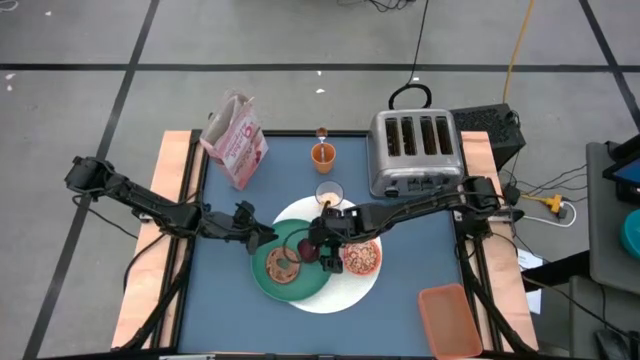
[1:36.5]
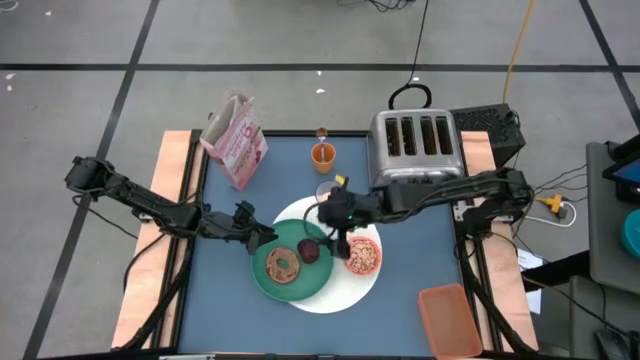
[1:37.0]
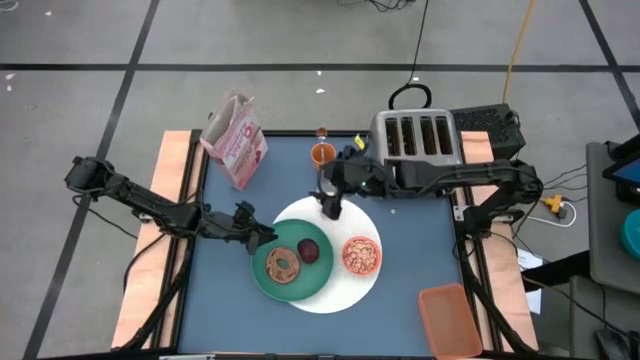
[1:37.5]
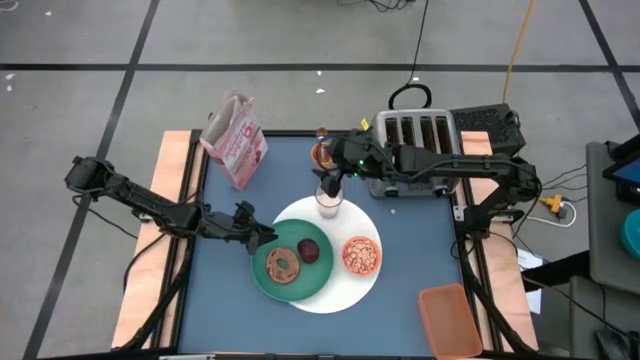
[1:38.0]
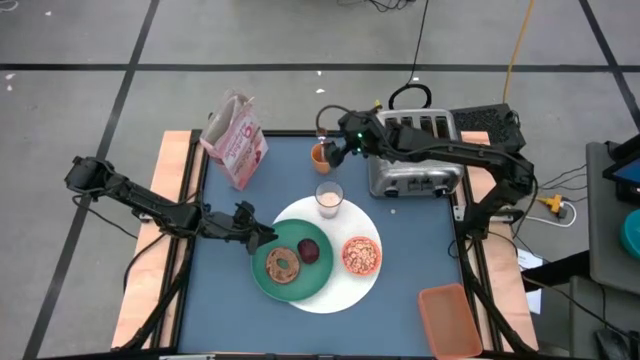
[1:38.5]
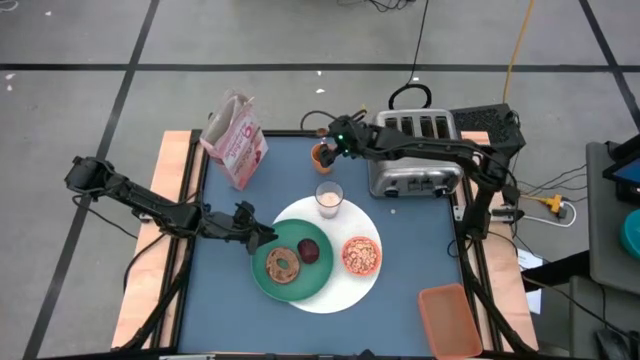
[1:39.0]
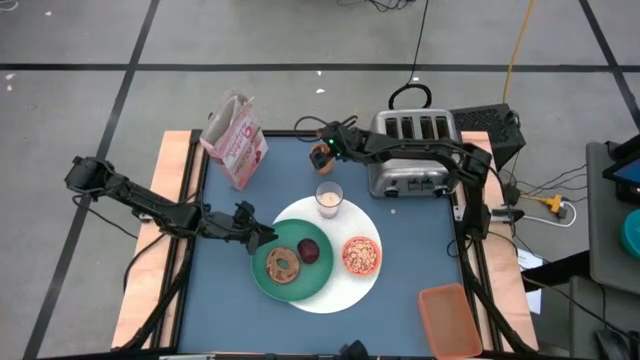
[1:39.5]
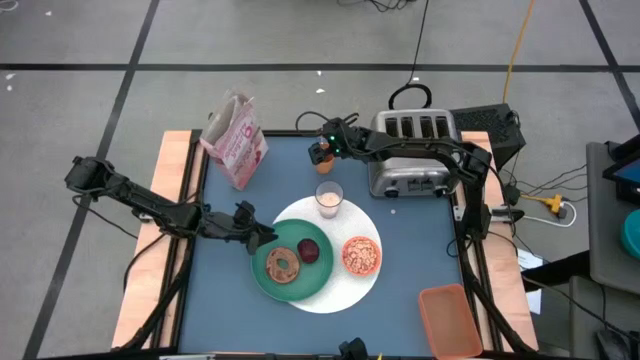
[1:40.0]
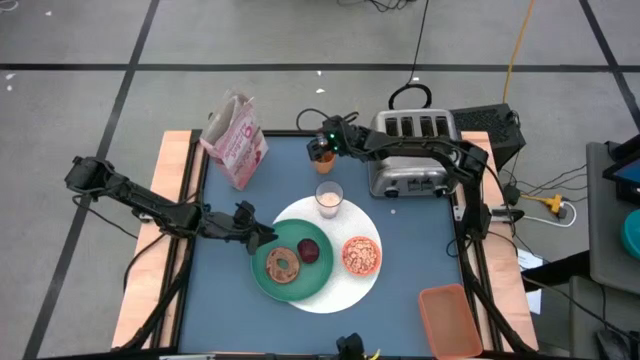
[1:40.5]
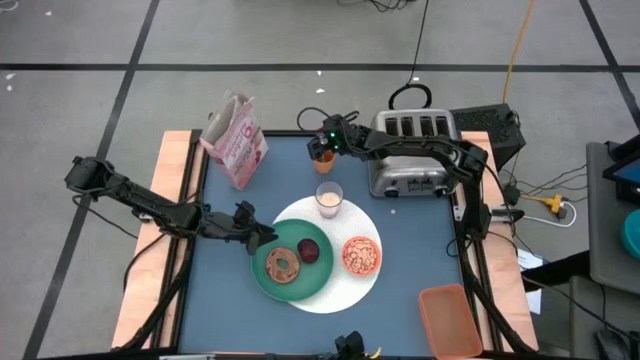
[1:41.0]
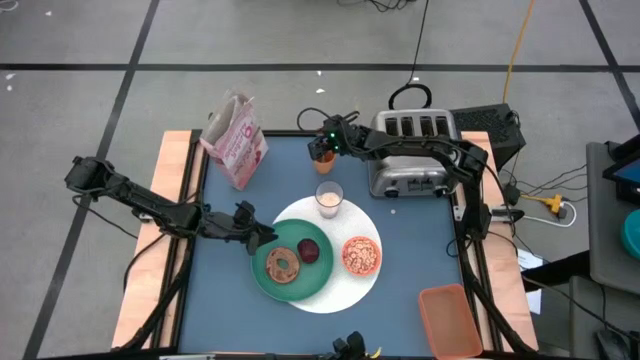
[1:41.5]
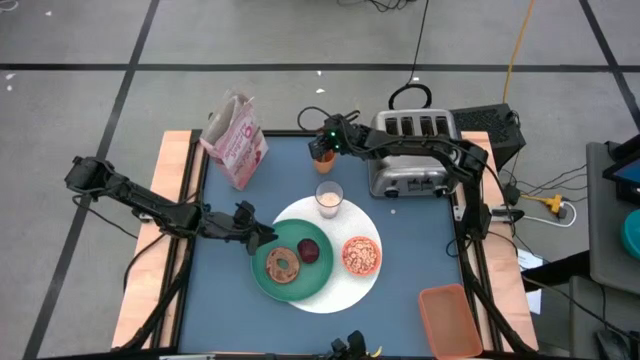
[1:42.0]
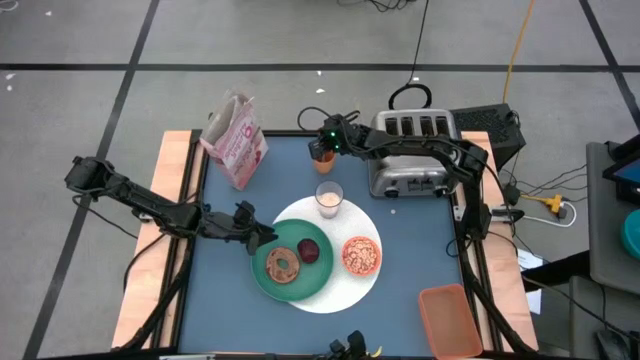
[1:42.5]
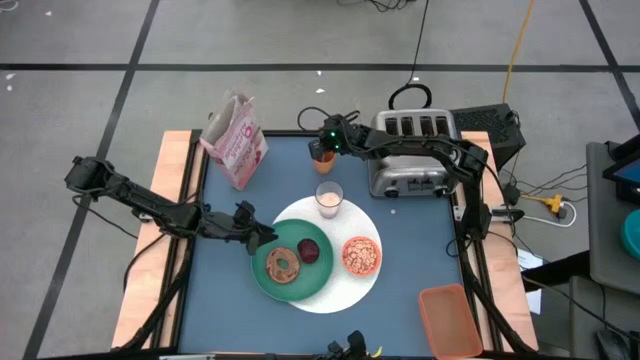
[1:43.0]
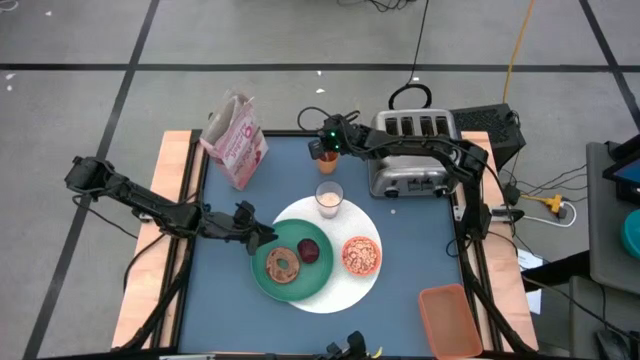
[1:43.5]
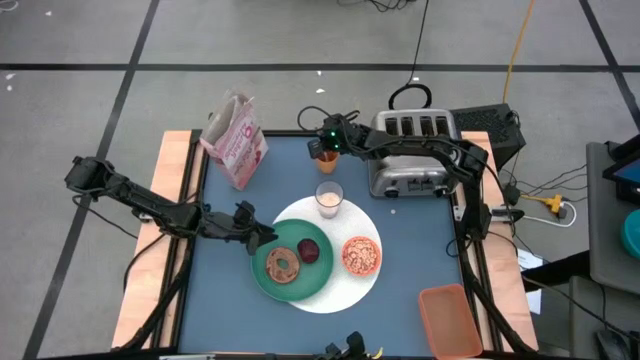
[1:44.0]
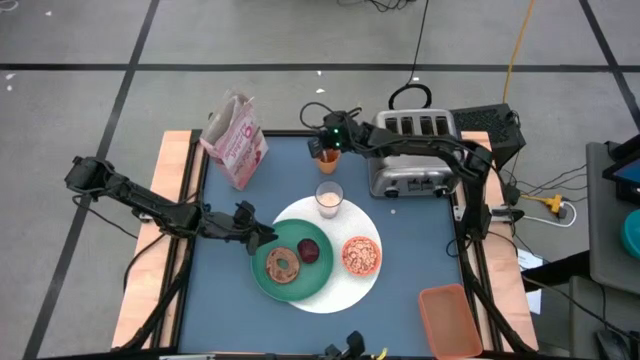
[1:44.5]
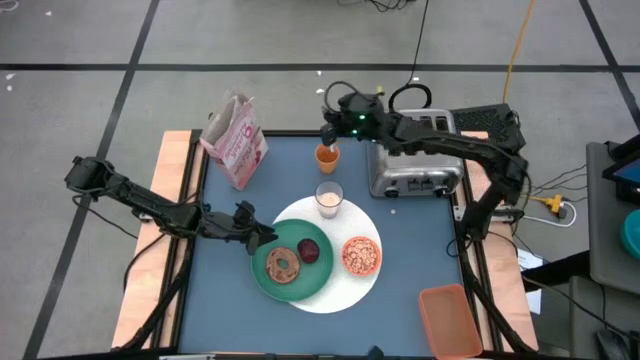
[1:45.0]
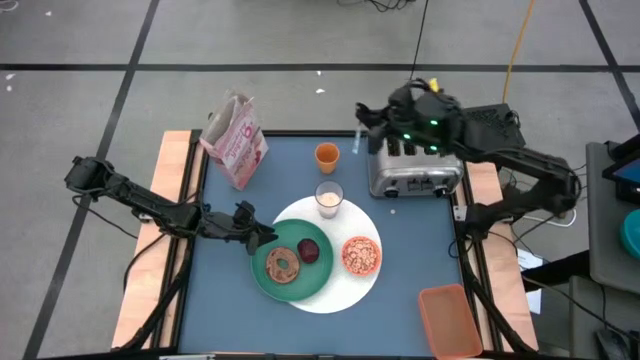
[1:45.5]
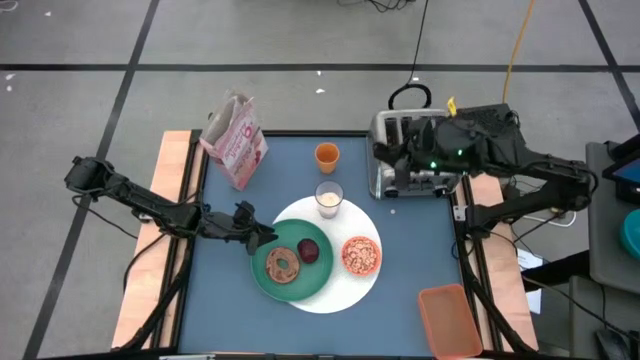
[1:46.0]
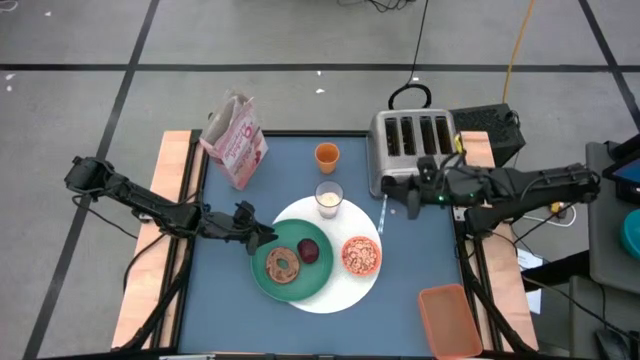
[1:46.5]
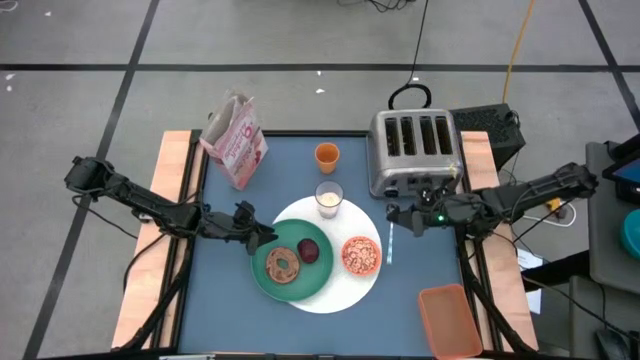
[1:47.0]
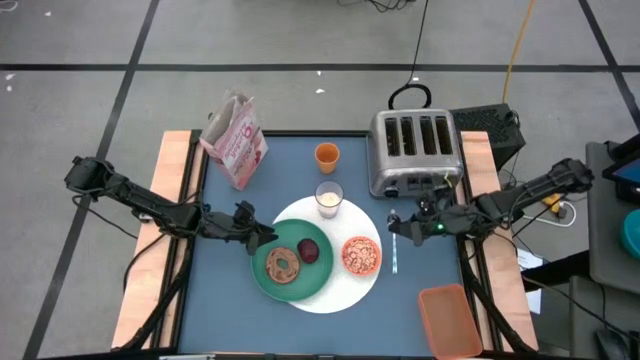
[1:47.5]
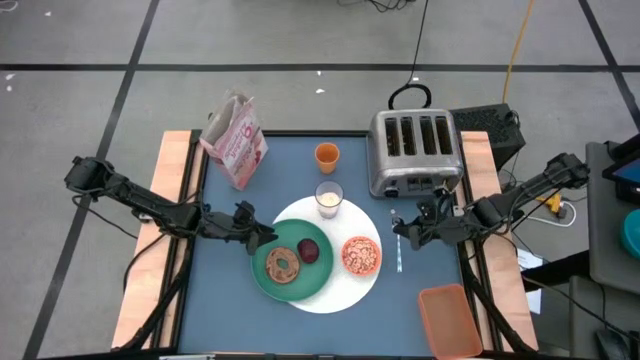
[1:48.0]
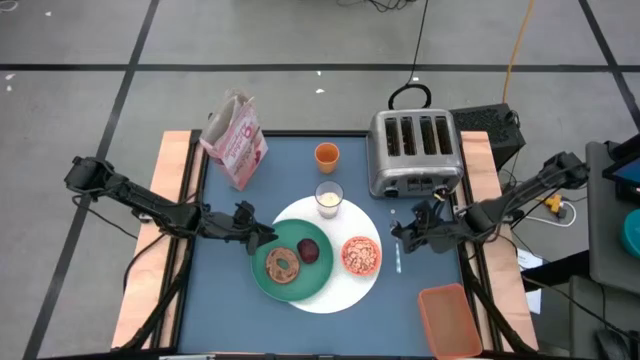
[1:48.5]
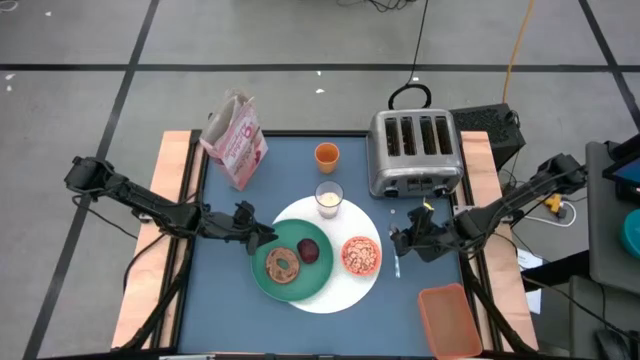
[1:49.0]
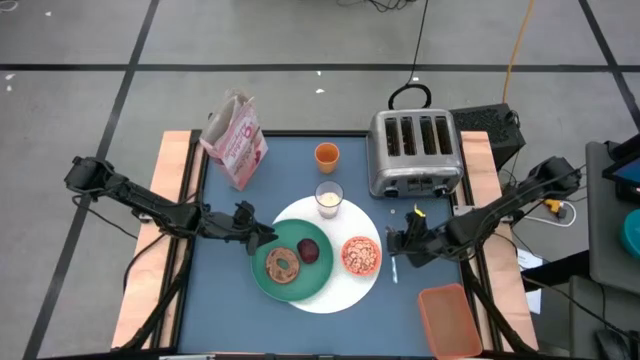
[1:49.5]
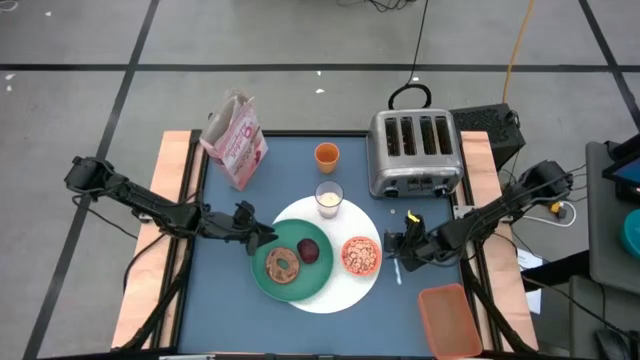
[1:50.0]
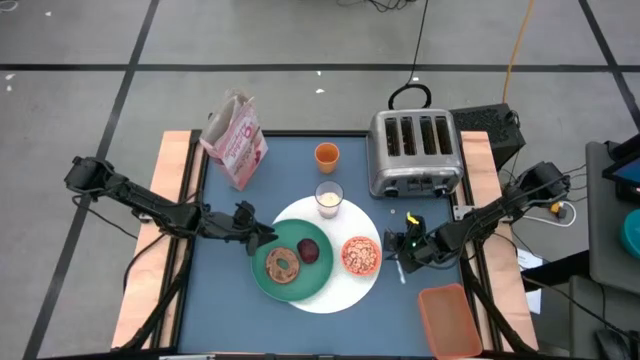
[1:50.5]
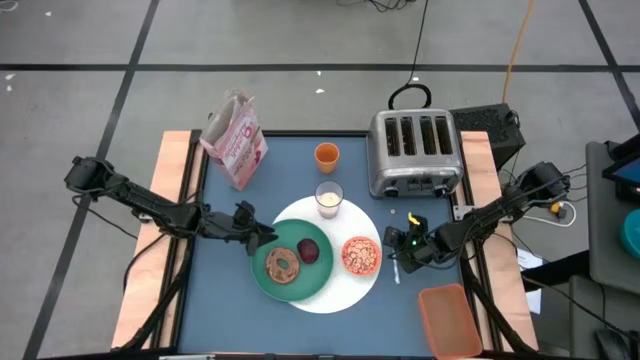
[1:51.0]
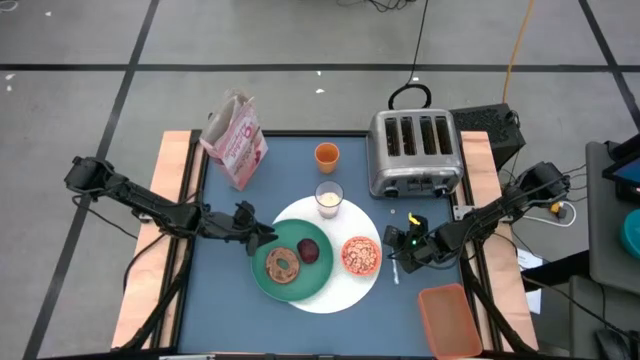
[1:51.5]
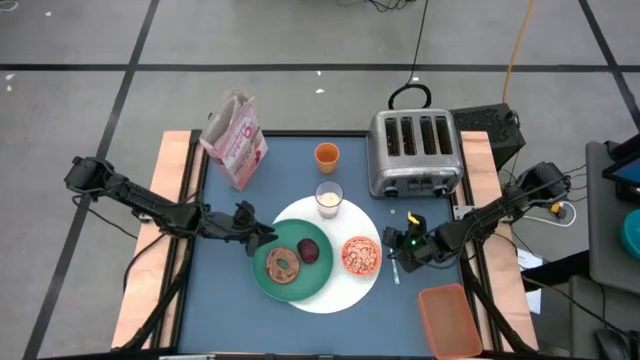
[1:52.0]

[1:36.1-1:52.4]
Task: Arrange a breakfast setting
Put the green white spoon on the right side of the white place mat

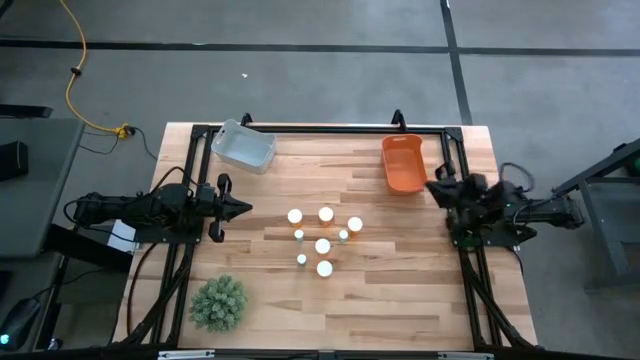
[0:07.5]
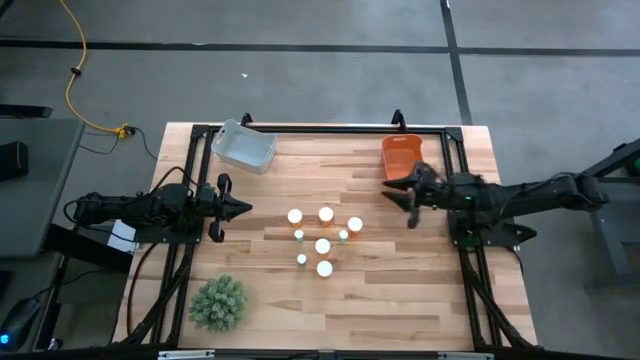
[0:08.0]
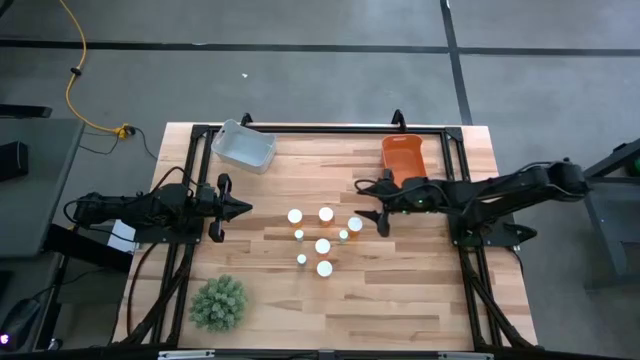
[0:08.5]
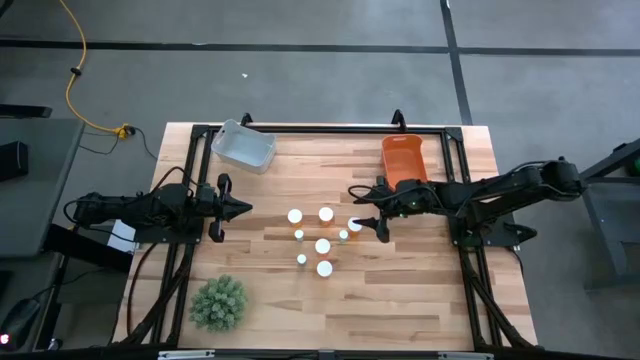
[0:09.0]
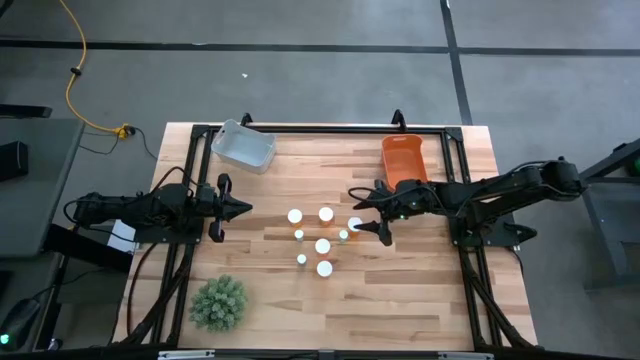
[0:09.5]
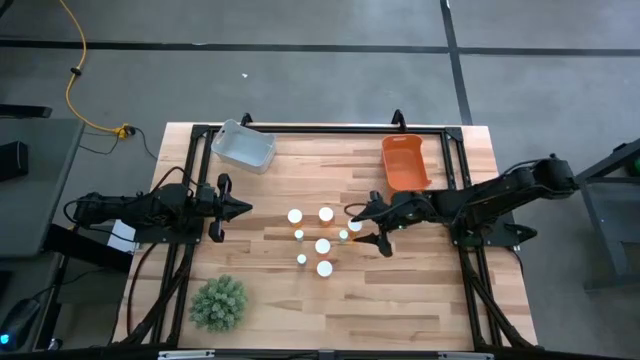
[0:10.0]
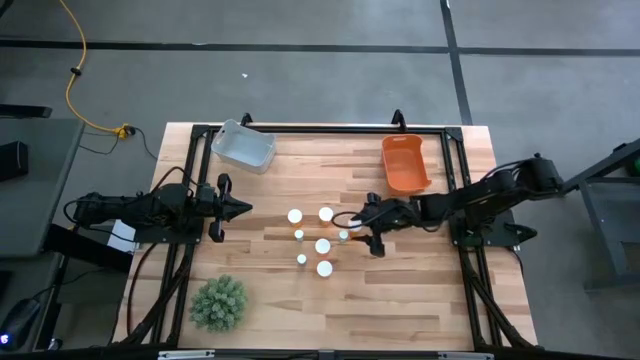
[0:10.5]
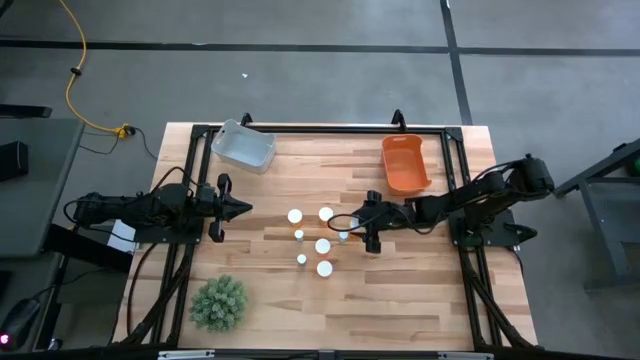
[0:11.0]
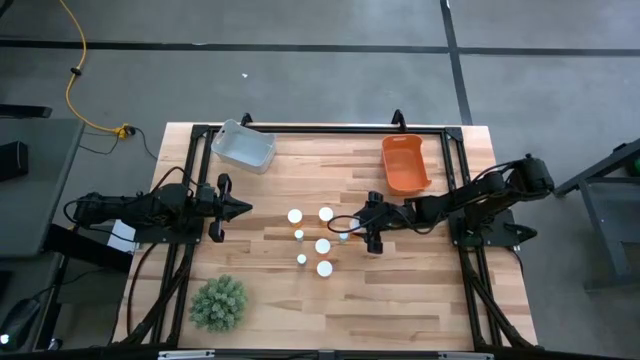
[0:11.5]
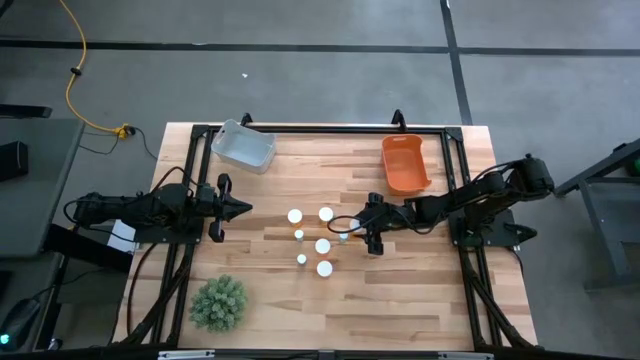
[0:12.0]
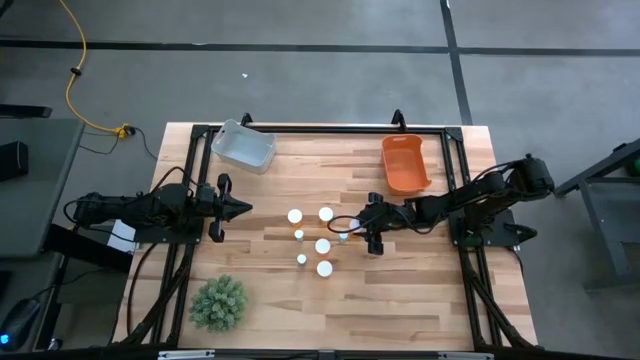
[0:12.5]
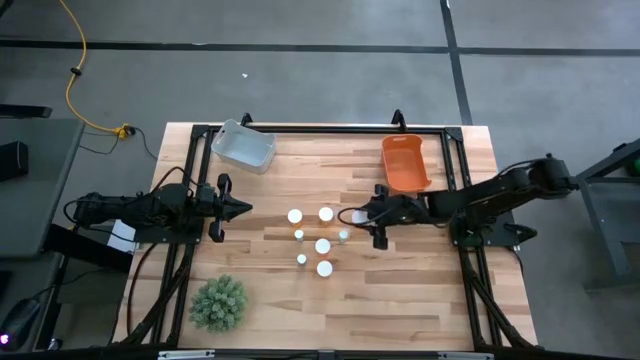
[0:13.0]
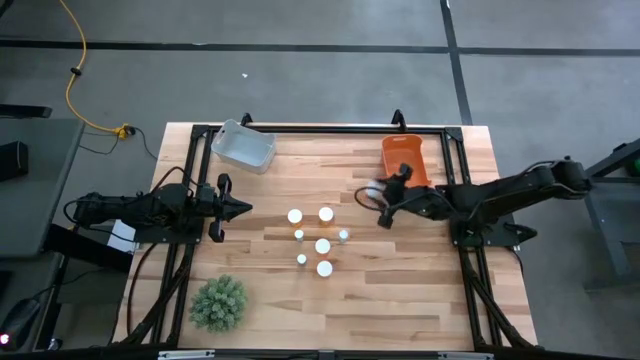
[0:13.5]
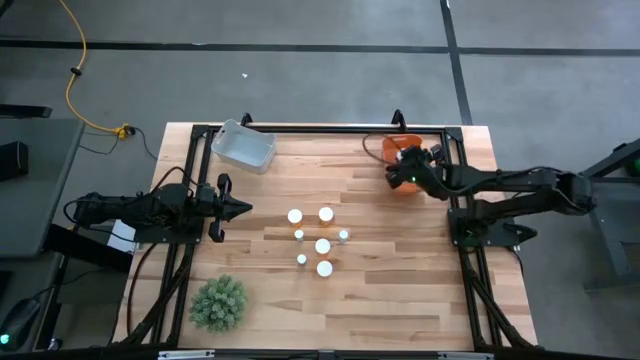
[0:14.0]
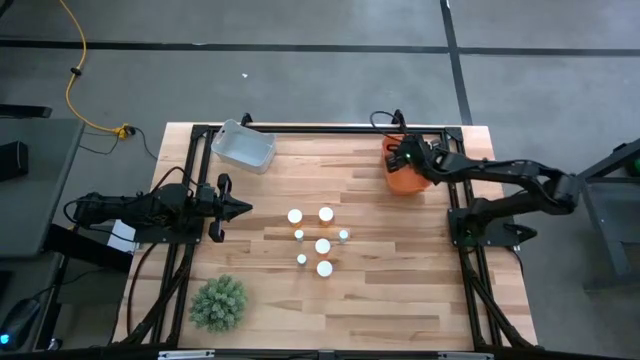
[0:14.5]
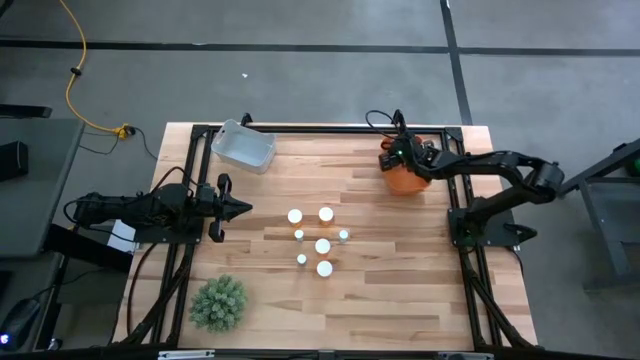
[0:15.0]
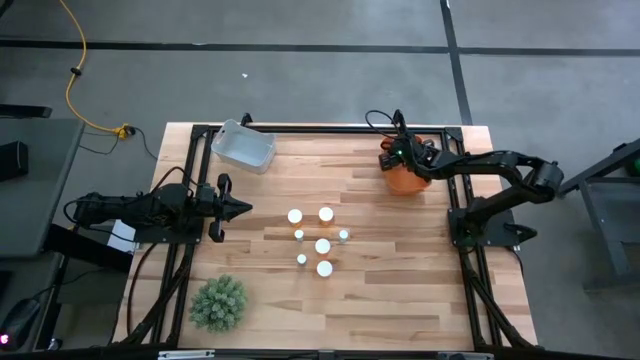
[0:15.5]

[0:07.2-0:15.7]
Task: Pick and place medicine bottles into bin by pill shape (circle, oval)
Put the orange capsule bottle into the orange bin
